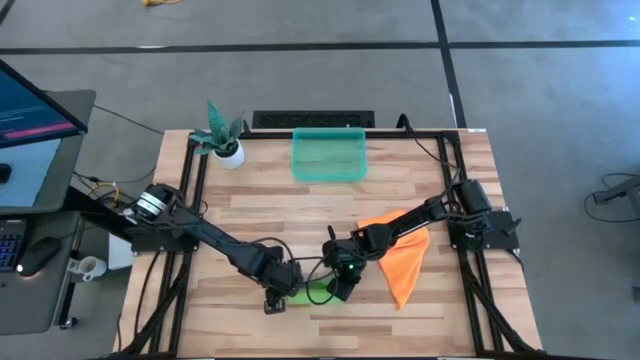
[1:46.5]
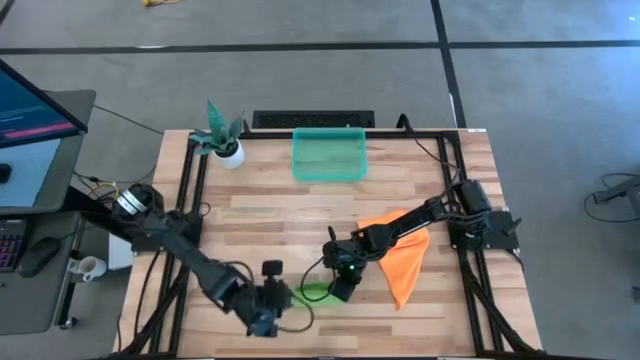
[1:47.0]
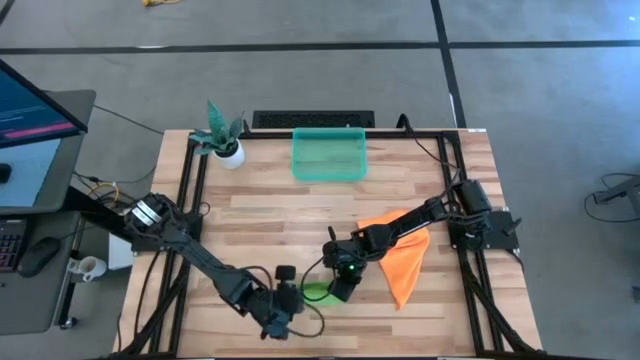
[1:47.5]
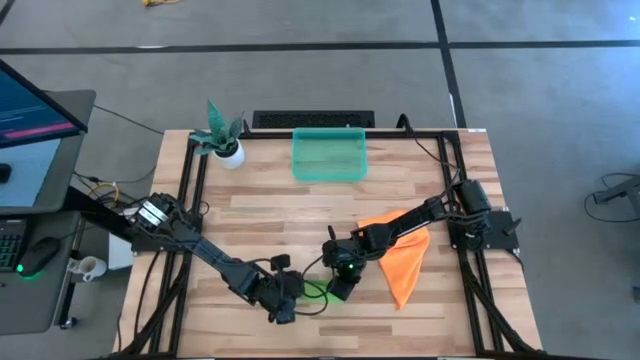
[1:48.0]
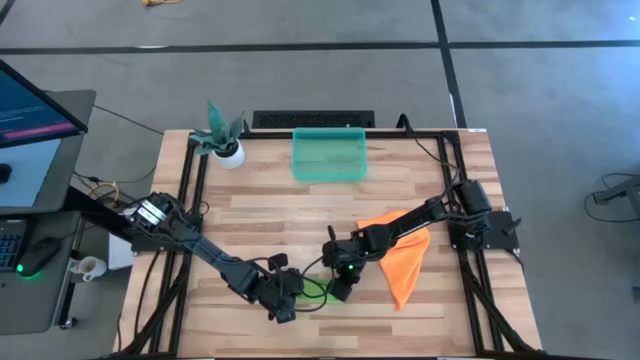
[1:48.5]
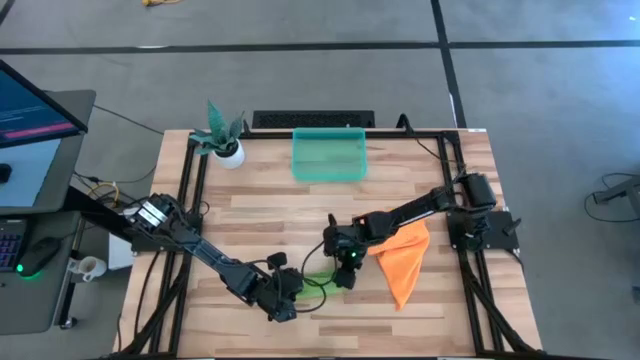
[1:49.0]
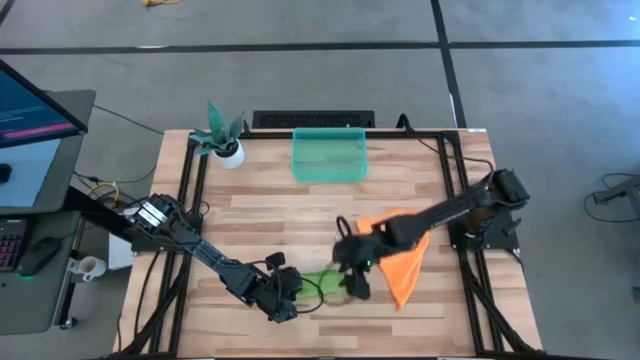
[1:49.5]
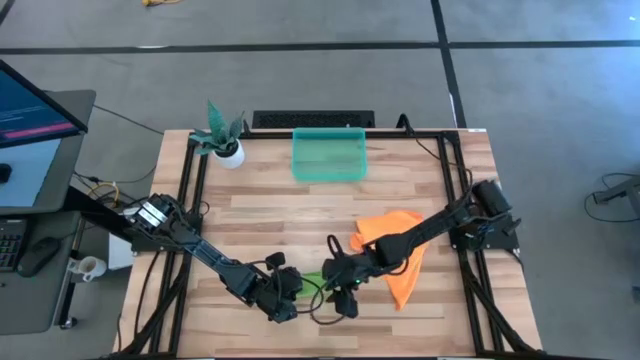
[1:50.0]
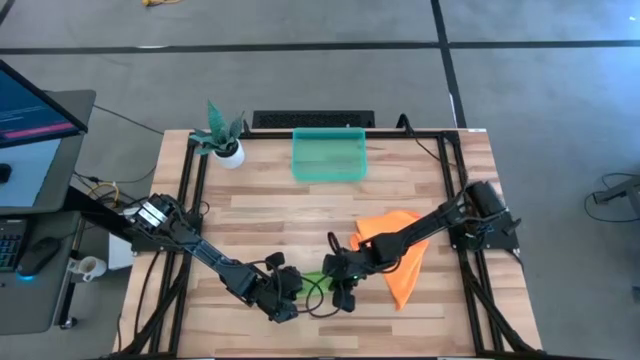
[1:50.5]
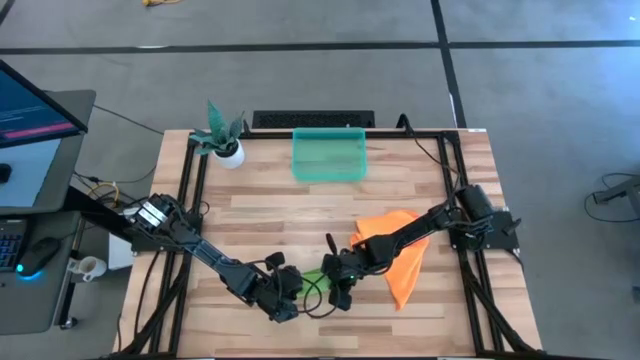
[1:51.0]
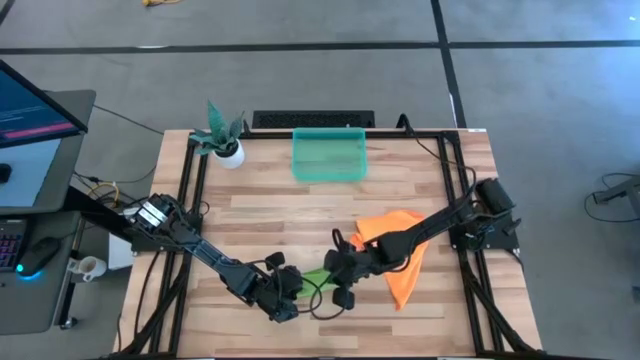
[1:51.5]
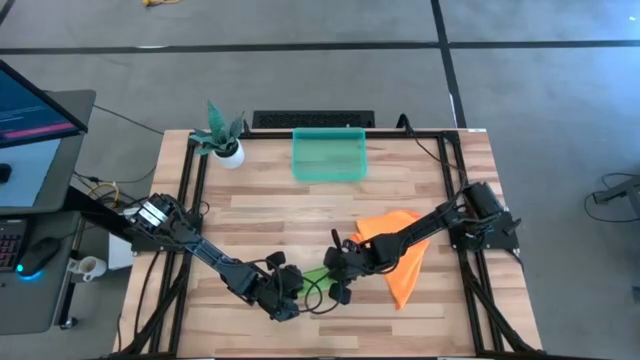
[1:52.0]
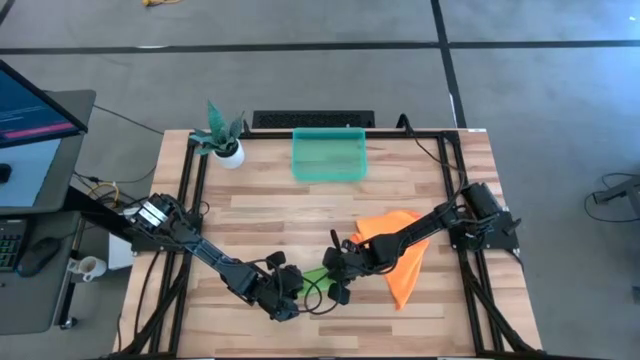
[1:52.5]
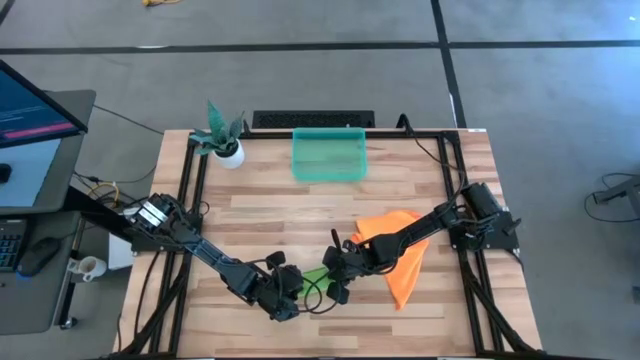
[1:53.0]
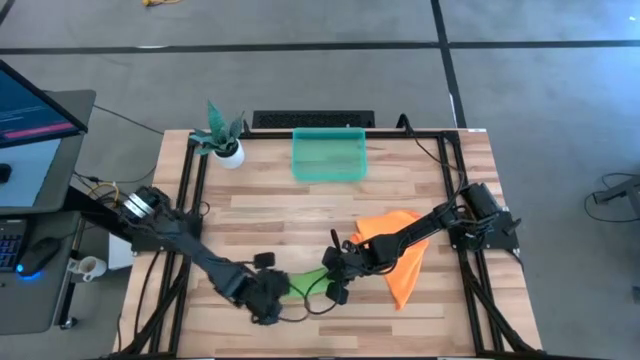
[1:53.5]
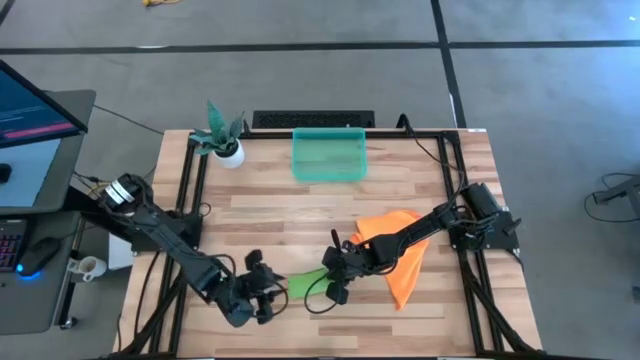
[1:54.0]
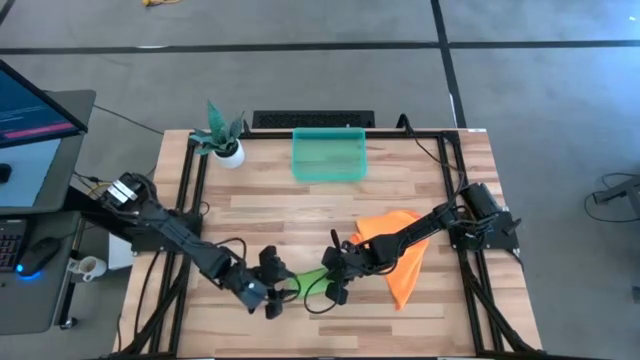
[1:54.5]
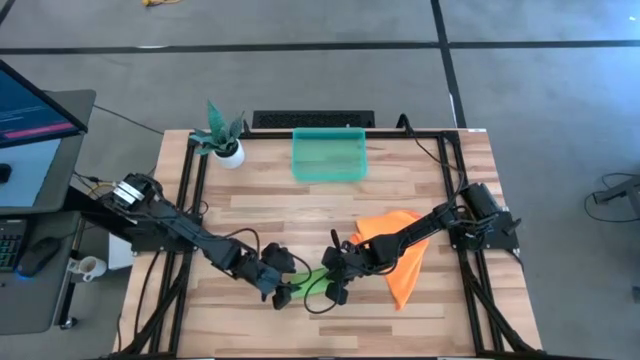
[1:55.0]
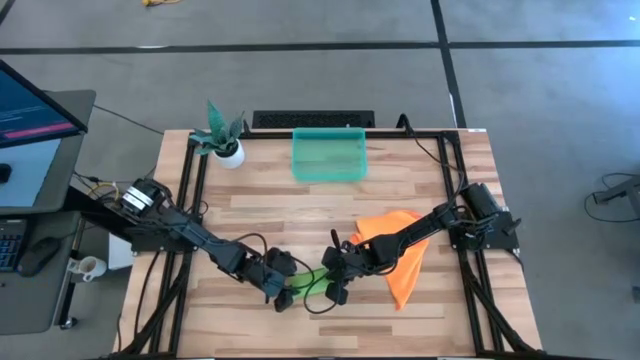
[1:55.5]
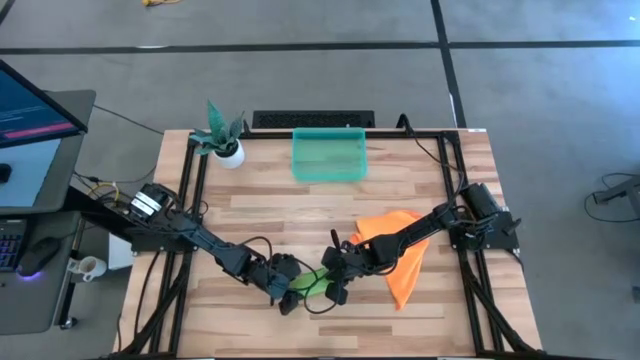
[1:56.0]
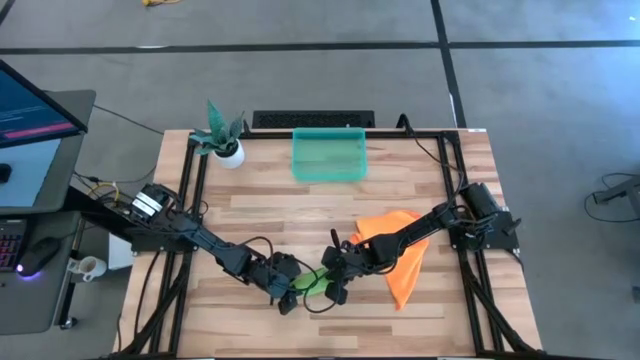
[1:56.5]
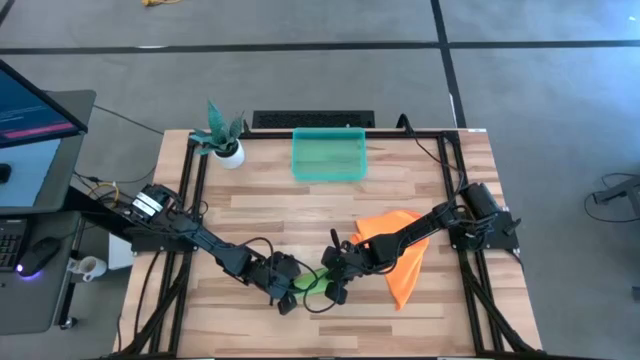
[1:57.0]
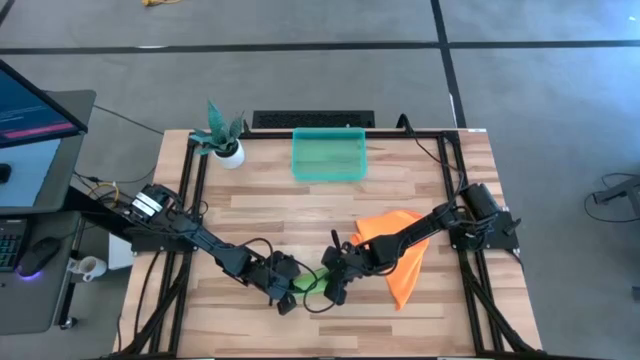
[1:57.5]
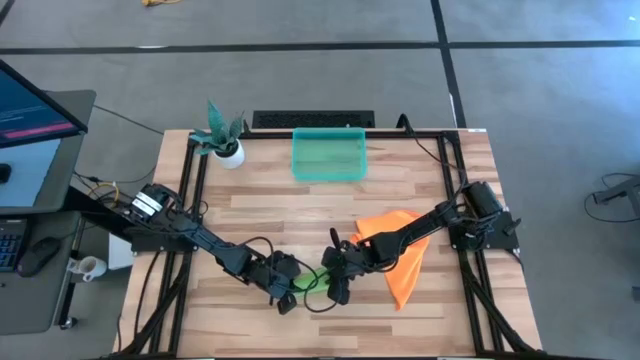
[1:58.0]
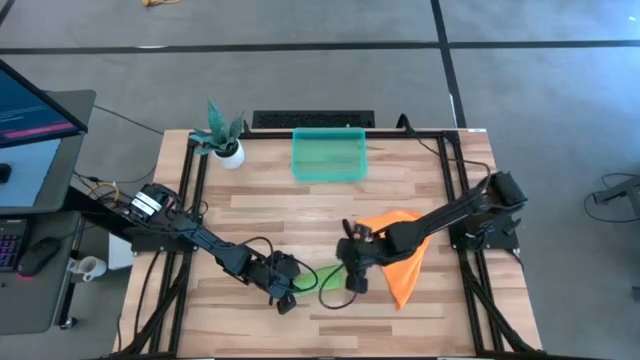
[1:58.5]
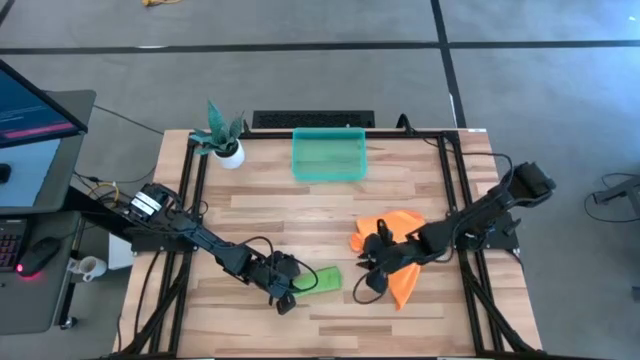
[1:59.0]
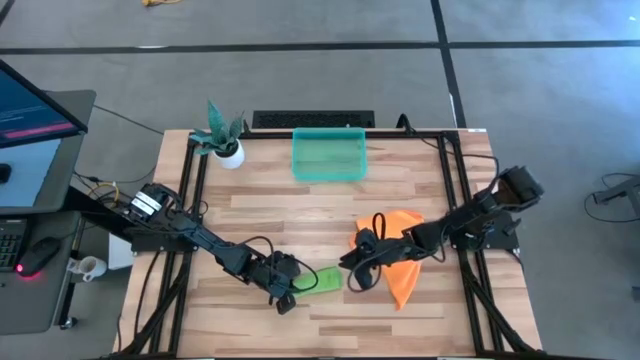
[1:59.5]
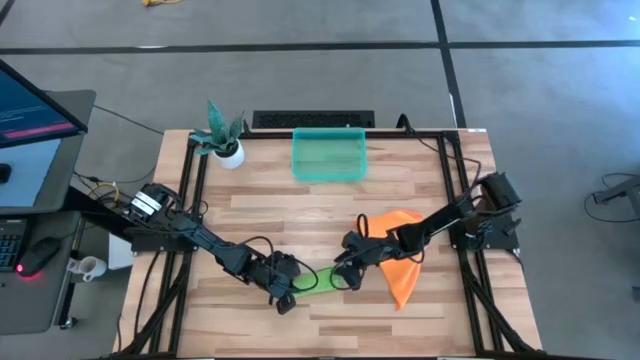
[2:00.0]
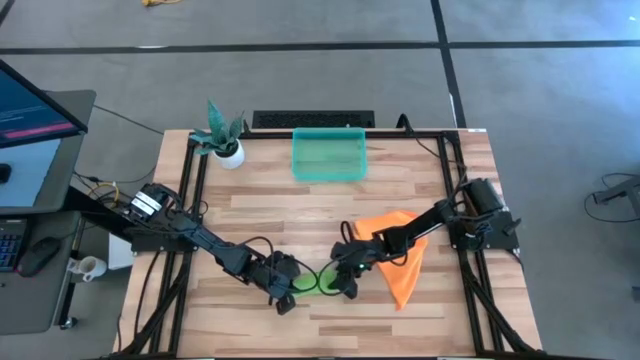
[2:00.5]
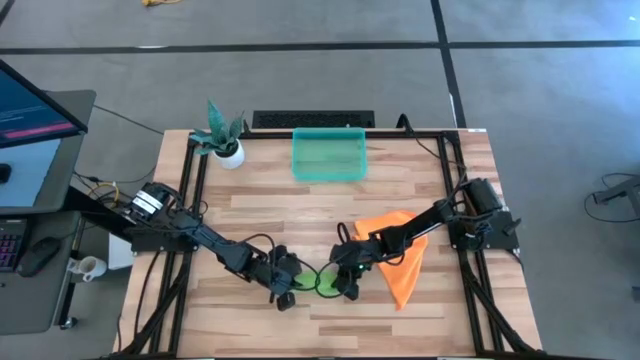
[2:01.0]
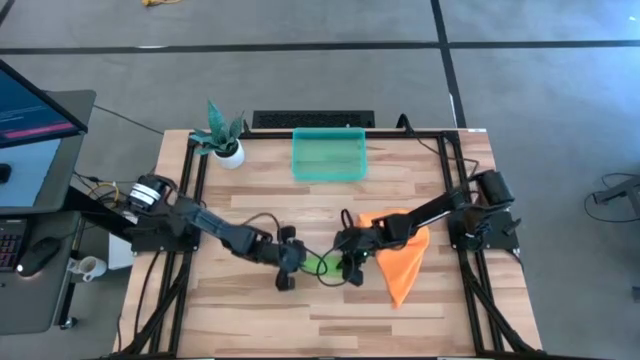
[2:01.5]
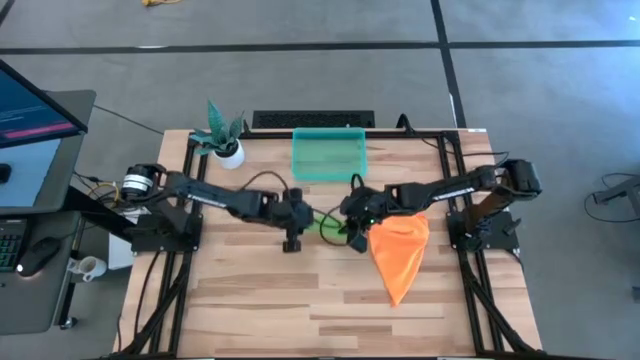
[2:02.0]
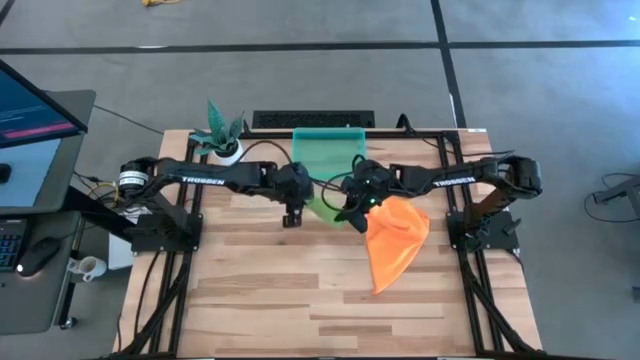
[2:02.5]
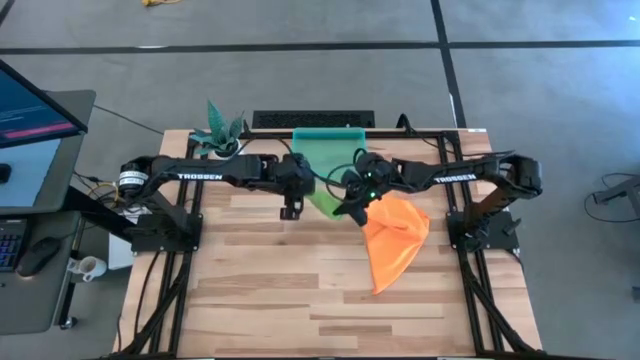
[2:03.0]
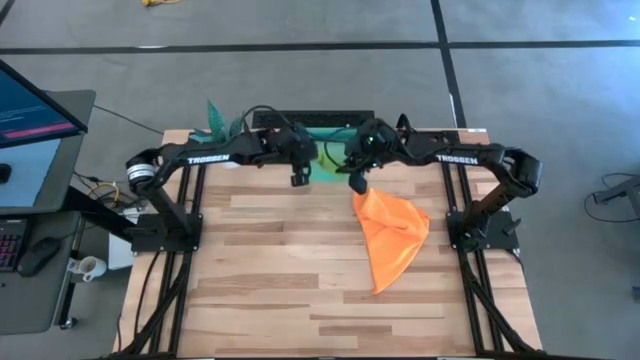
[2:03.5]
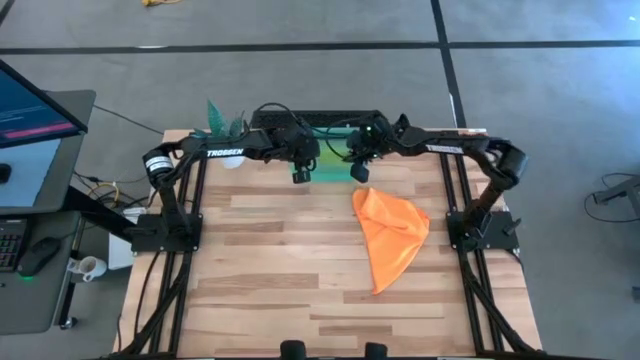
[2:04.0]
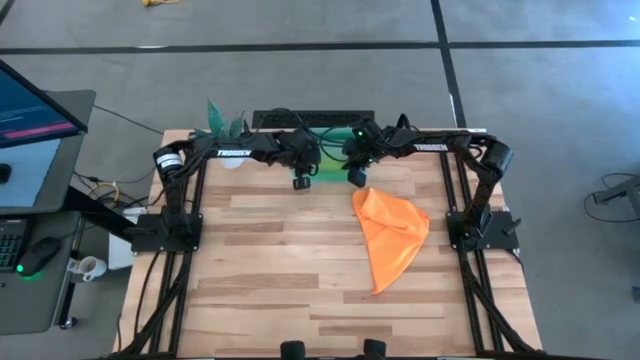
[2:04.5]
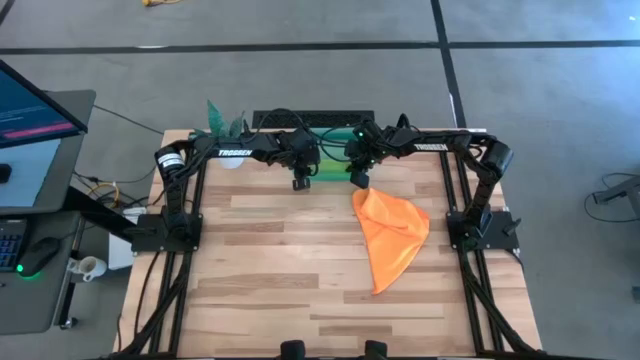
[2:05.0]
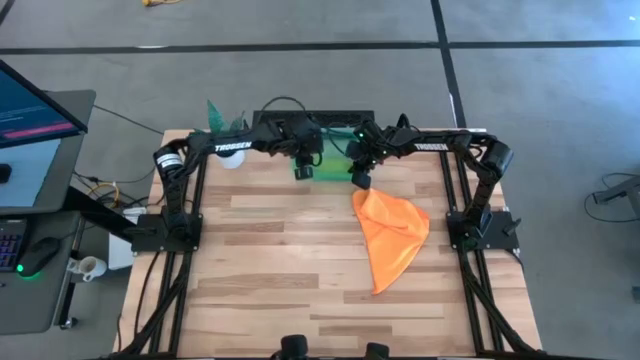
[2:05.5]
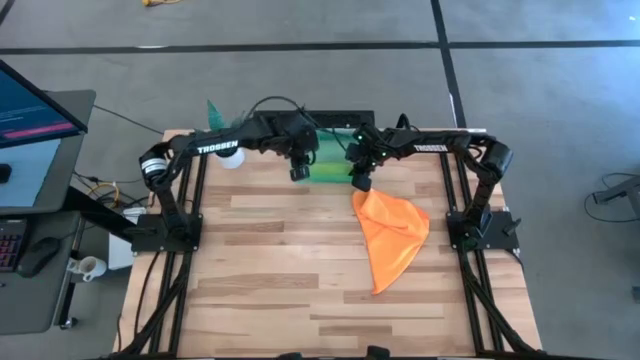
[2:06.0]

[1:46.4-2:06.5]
Task: Roll towel into tight, uniform cylinder
Roll the green microfiber towel

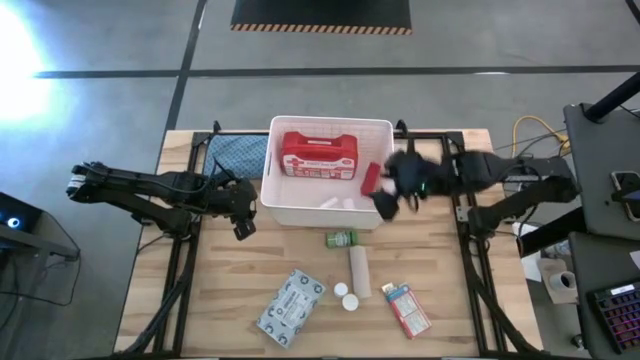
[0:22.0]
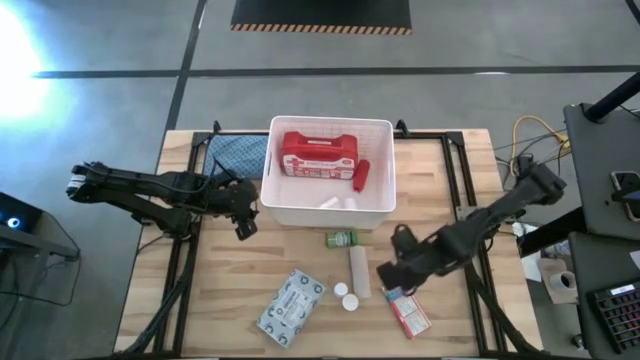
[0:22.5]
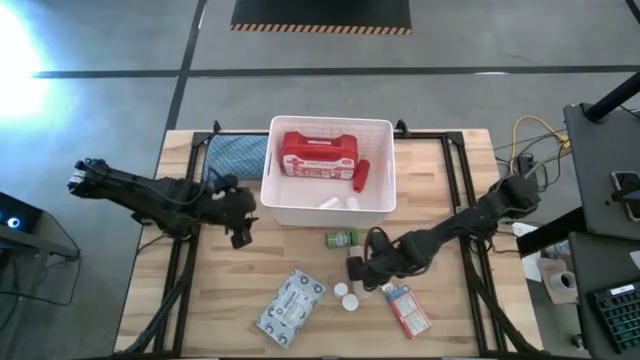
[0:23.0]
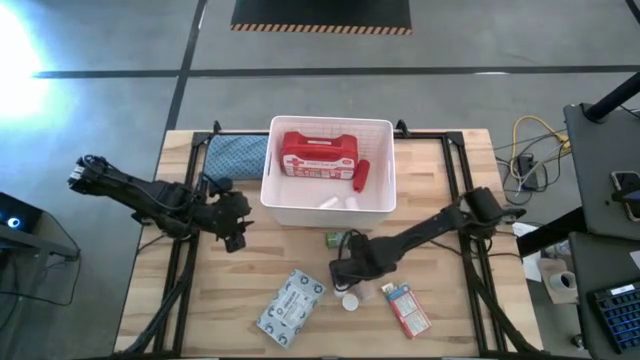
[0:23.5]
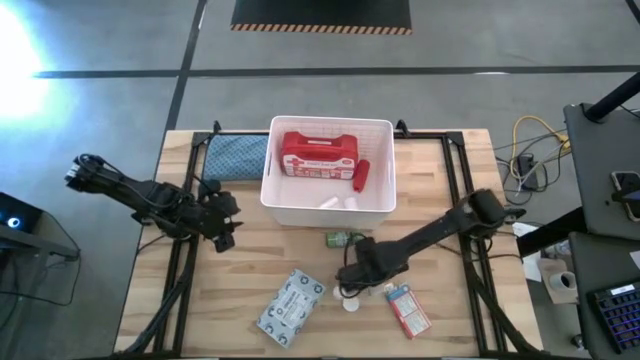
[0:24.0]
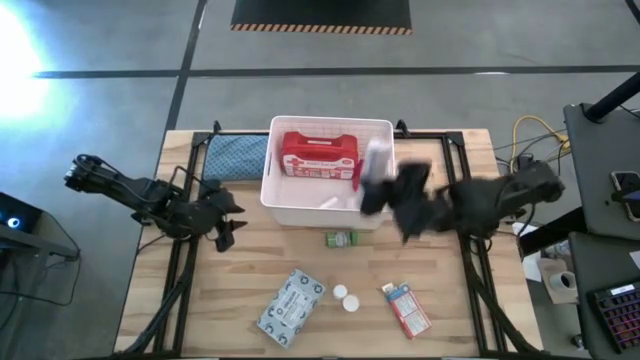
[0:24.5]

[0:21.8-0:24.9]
Task: Pick & place medical supplies in basket/bin
Put the white bandage into the bin
